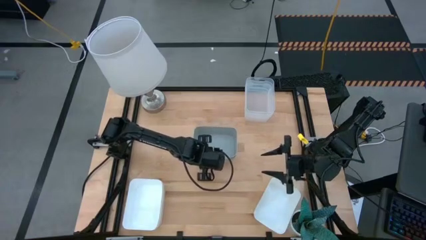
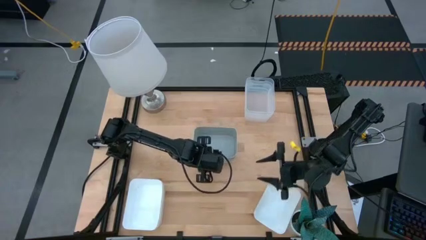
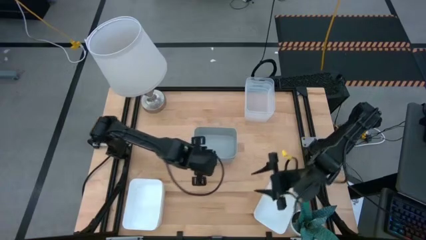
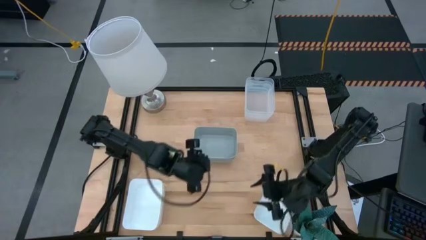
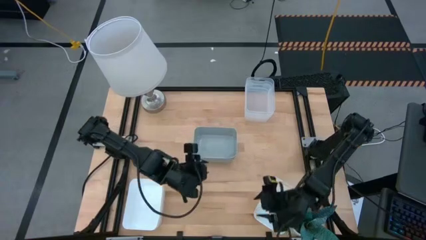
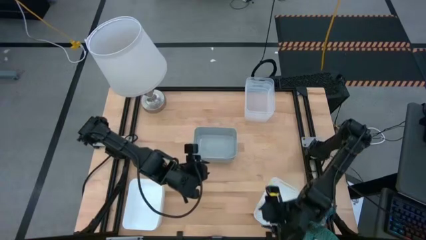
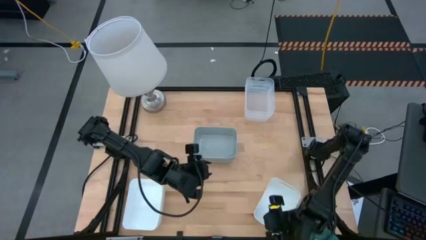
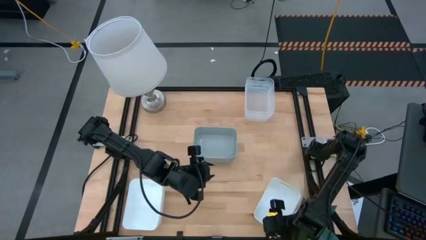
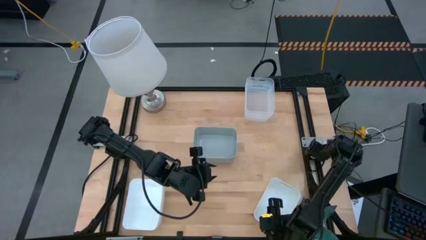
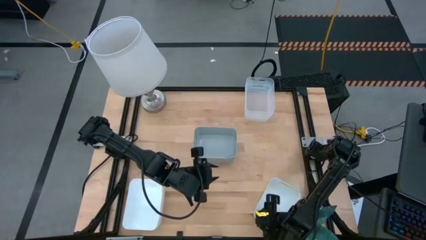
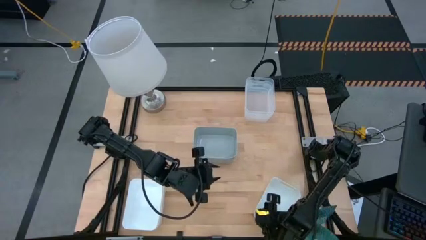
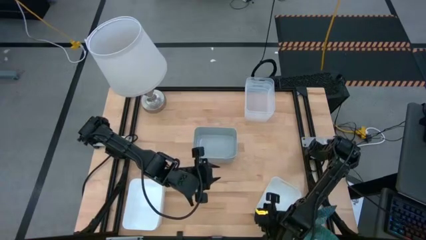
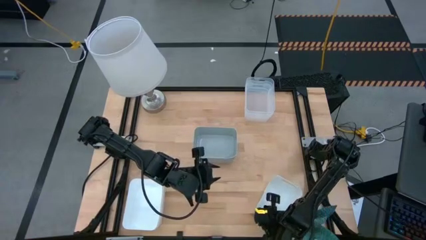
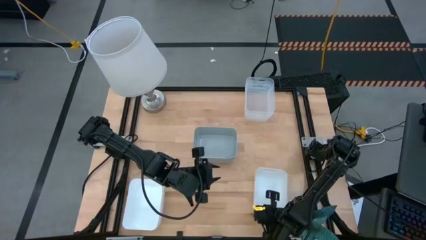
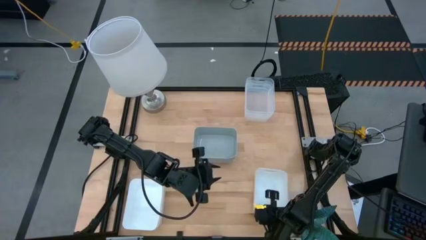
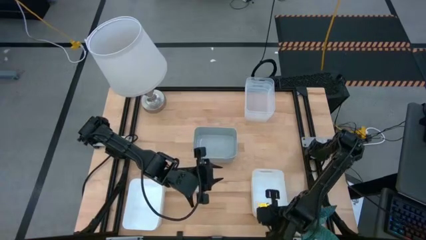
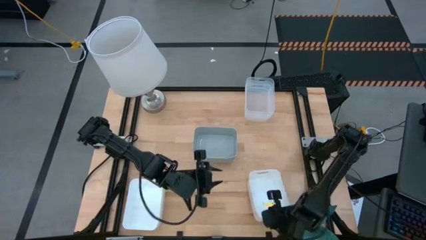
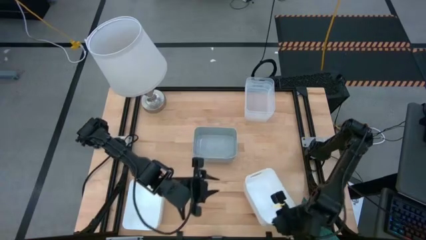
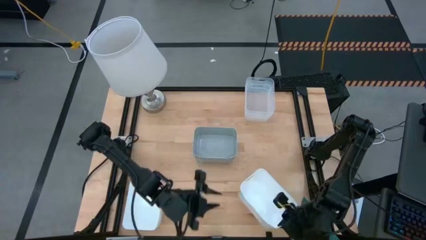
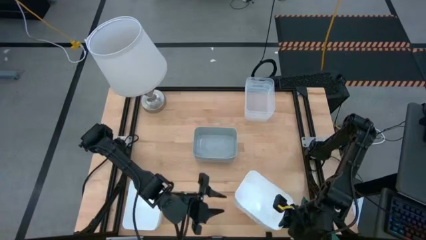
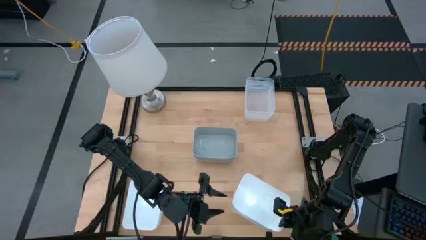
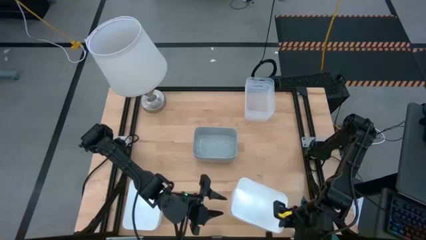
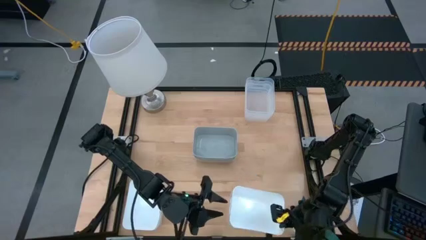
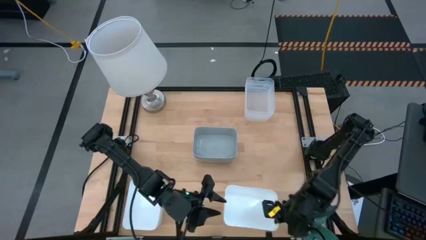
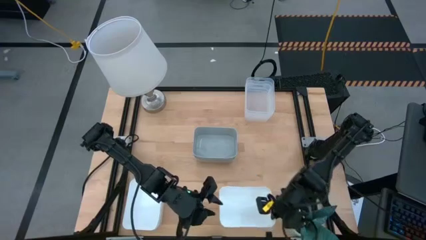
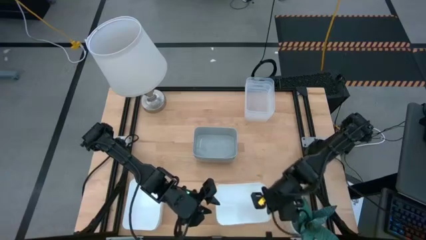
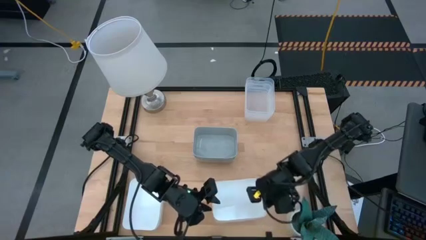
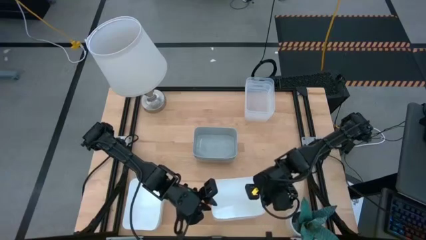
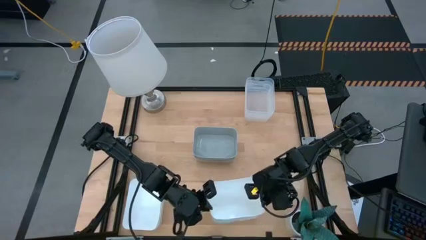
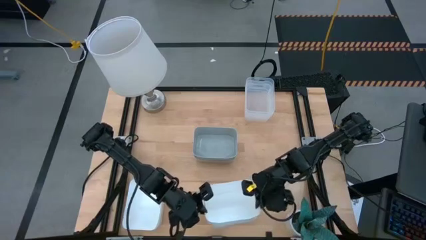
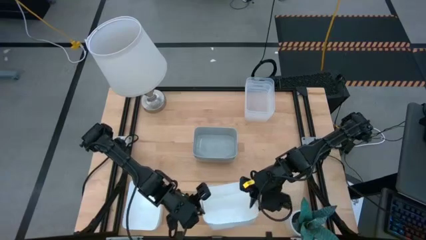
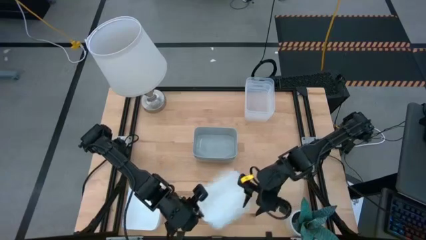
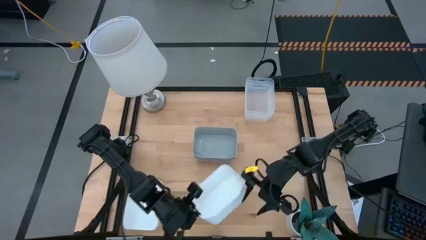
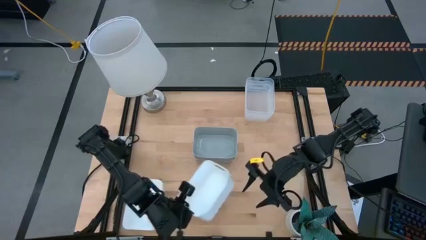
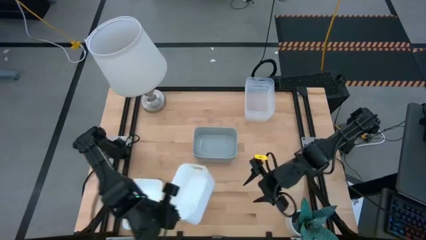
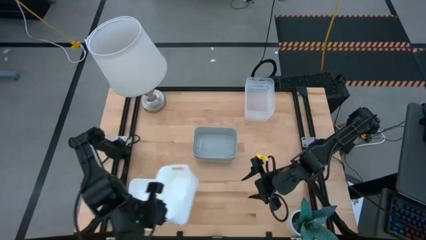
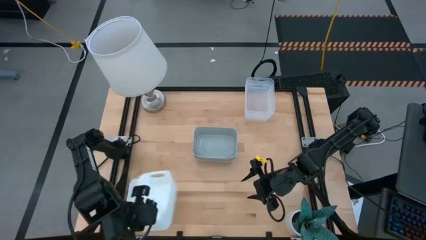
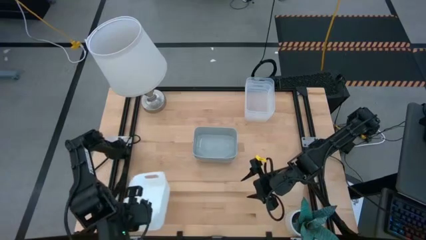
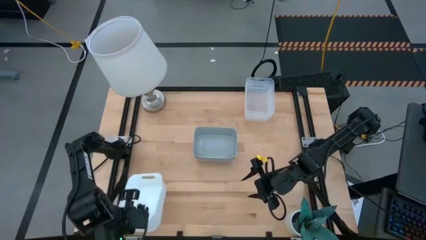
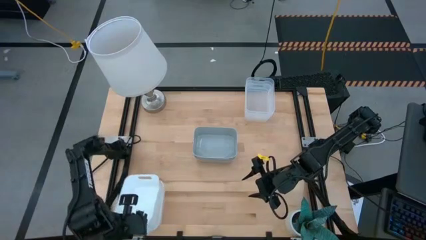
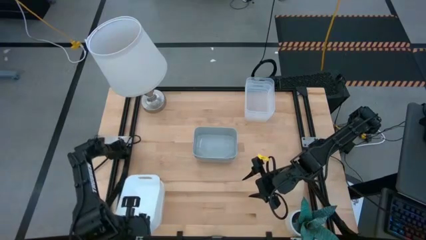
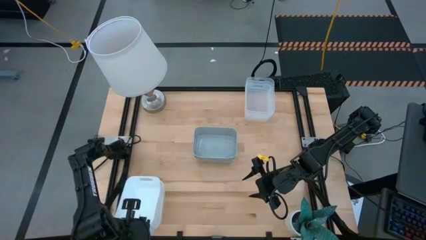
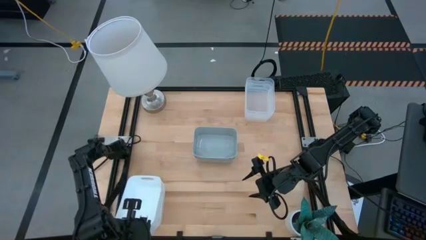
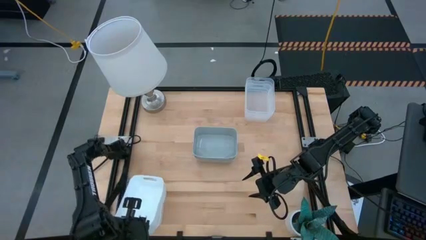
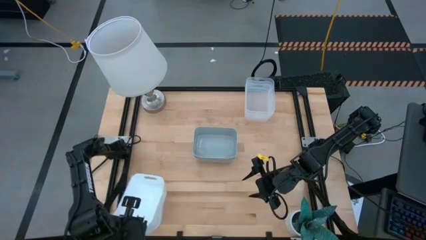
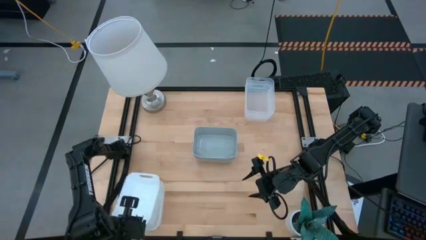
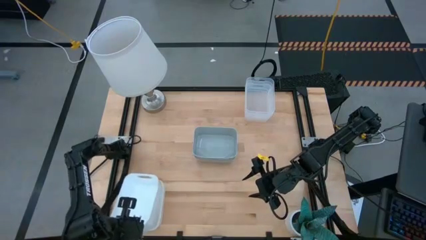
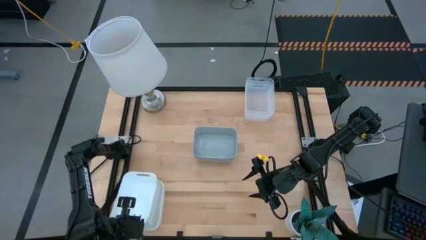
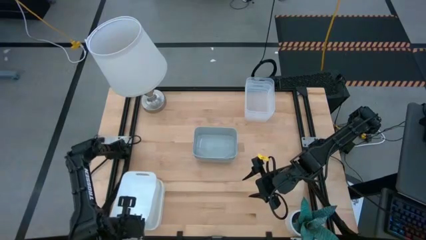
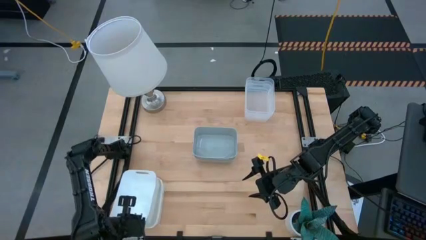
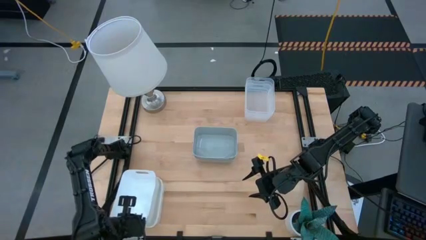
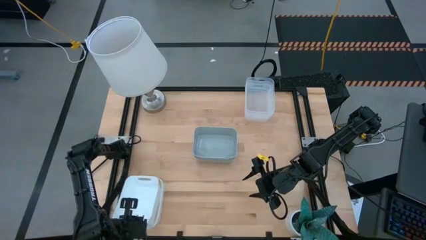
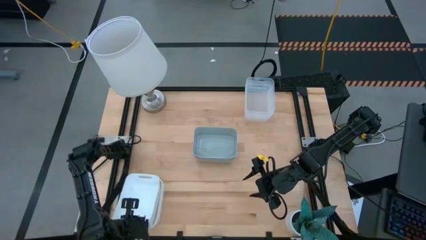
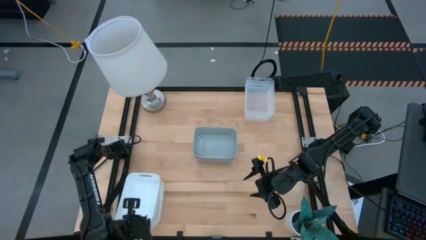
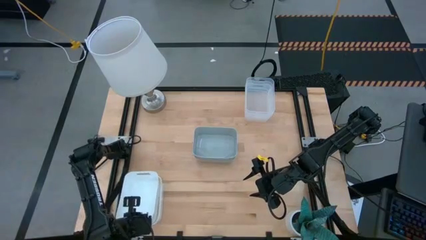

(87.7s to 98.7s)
Stack the white bin on the stacked white bins
